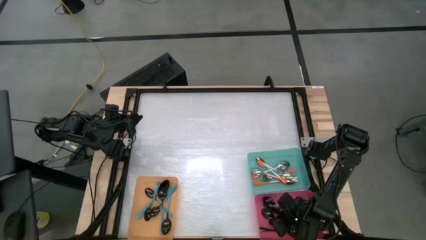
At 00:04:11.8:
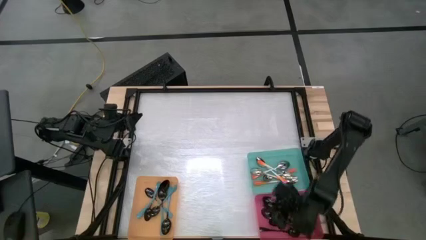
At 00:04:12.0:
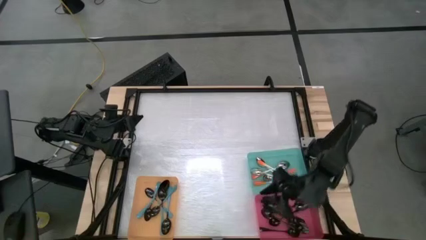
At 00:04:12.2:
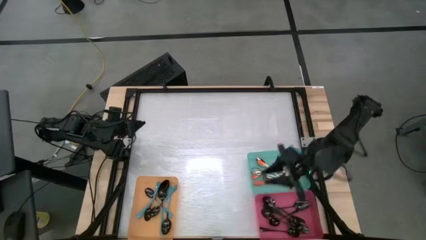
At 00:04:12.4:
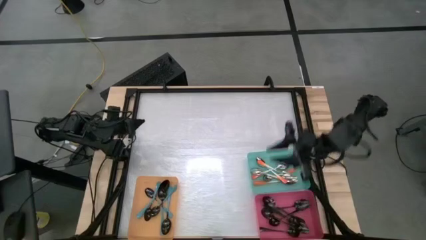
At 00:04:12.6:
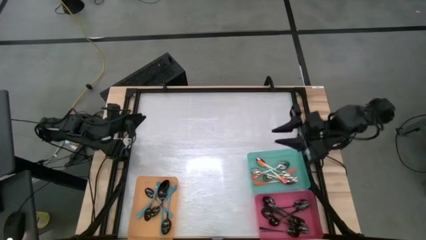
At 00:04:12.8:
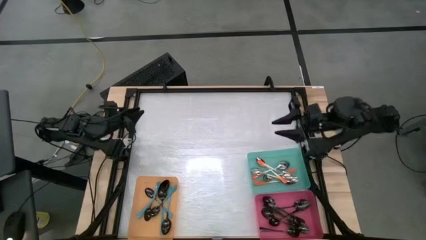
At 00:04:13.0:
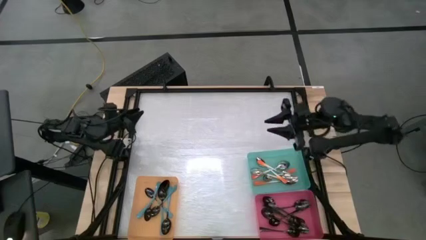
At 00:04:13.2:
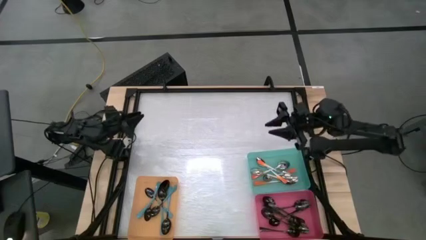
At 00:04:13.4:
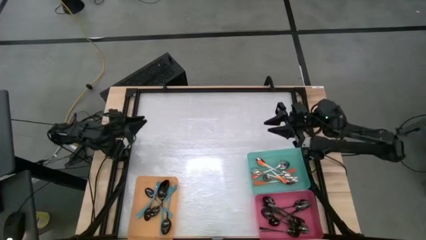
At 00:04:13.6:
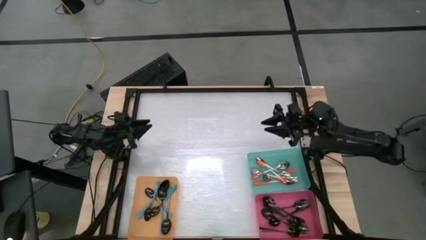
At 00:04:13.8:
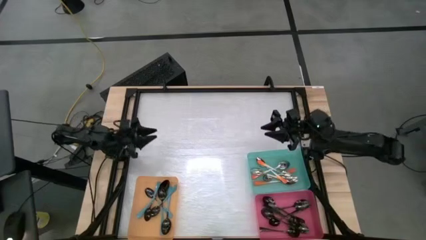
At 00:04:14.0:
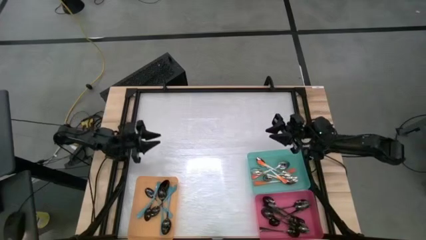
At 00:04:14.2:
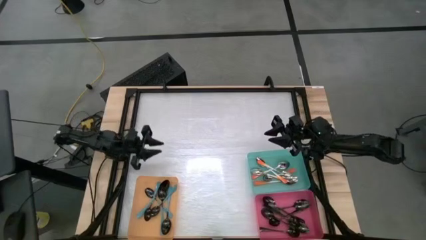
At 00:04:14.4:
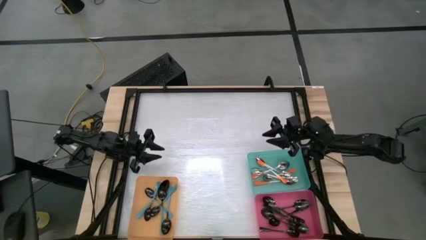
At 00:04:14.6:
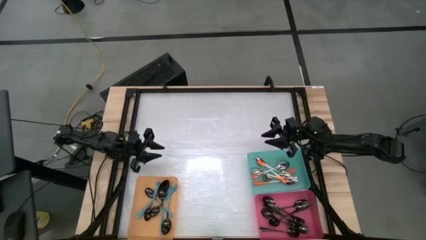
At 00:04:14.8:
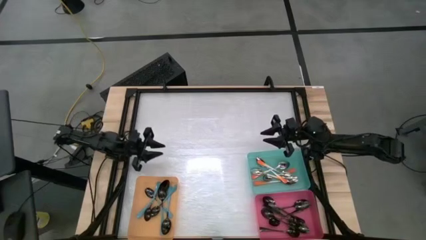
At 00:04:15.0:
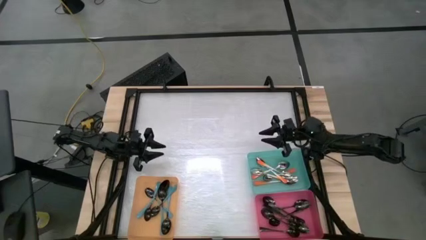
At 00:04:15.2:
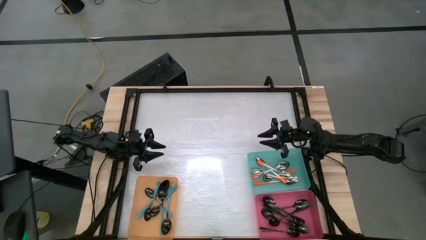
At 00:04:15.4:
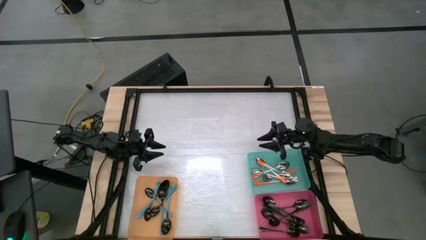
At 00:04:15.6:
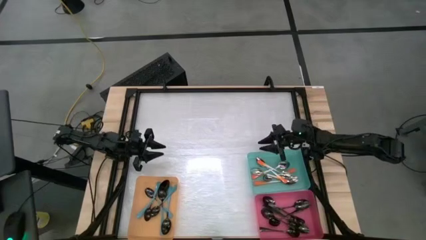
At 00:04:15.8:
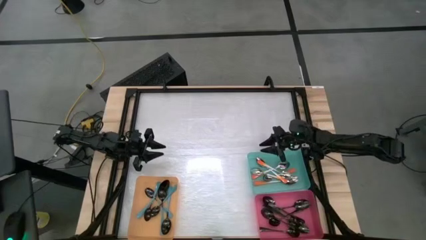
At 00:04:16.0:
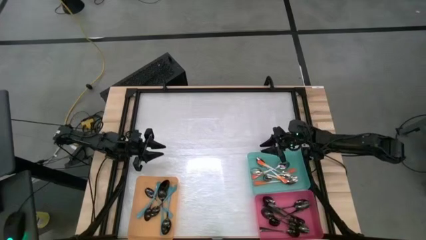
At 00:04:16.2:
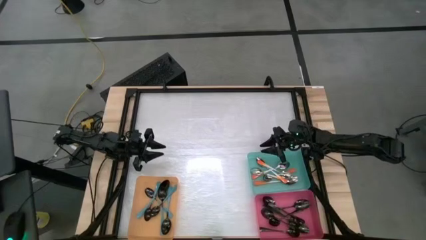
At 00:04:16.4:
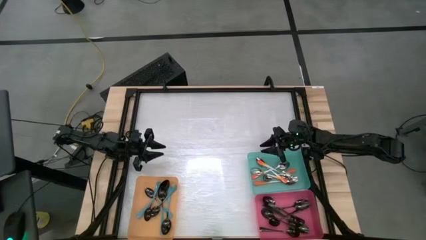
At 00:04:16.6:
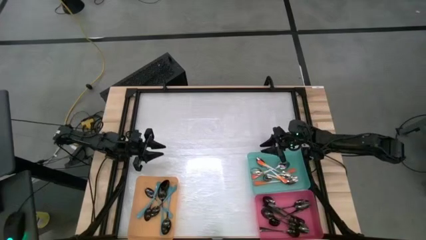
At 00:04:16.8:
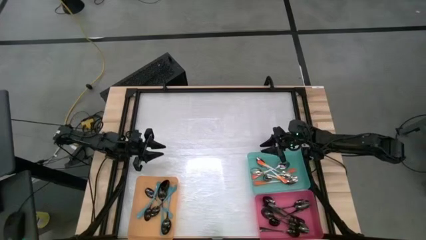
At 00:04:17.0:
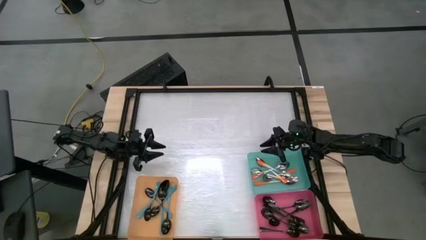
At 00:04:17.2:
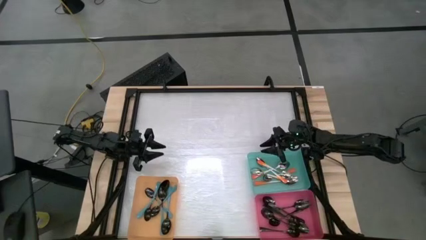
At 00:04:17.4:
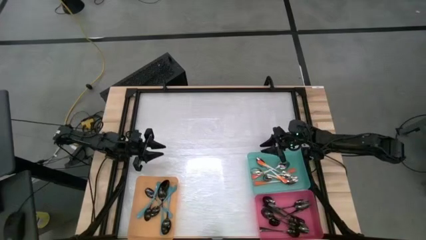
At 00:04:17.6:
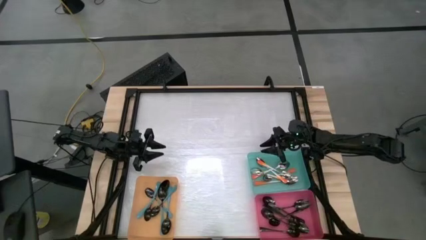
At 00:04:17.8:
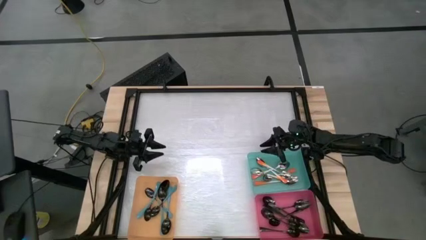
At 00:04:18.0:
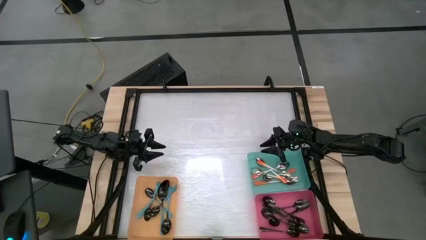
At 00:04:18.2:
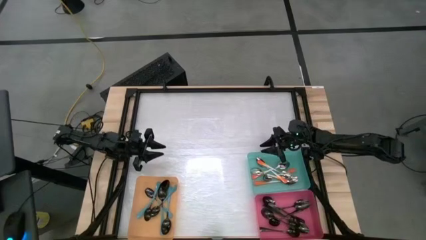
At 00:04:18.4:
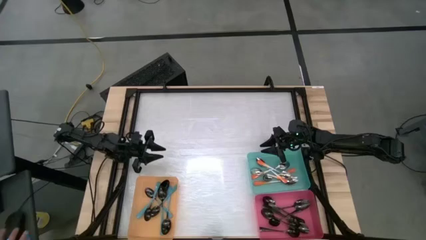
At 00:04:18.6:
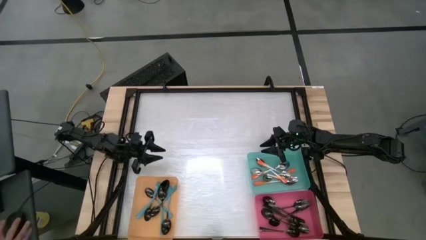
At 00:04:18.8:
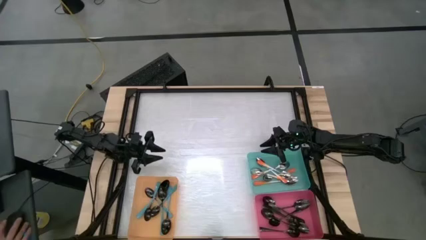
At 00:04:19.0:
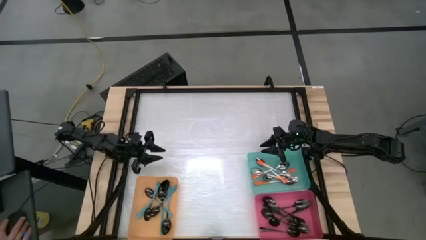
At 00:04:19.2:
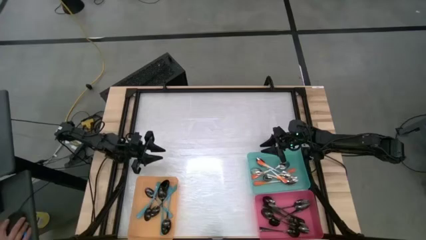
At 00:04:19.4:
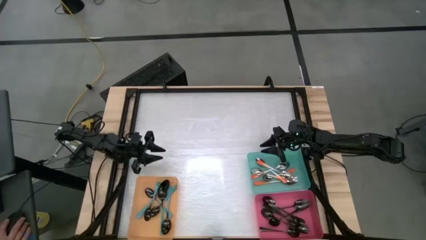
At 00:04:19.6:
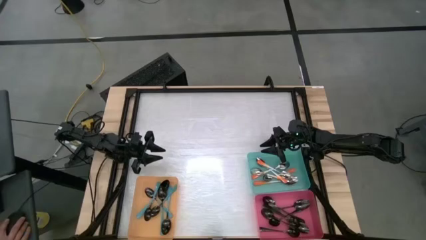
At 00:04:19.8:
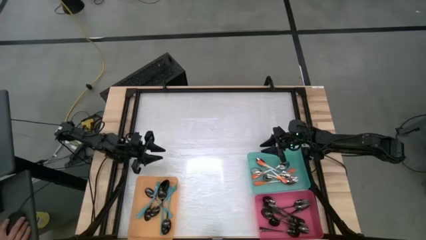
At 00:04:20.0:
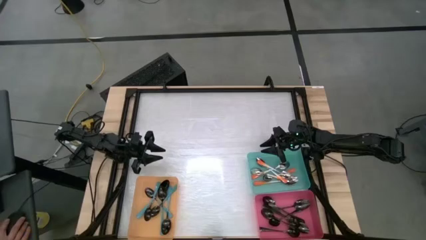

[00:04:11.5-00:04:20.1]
Task: Sort silverware by color (type)
Return to Home Position

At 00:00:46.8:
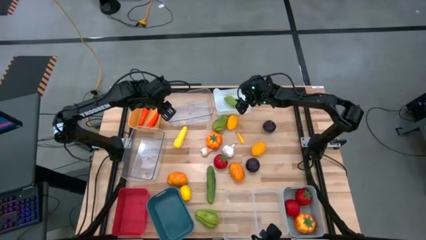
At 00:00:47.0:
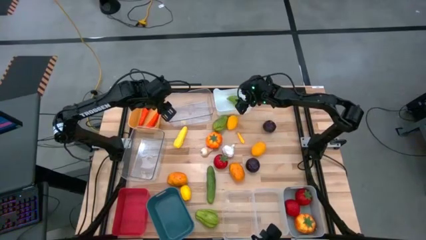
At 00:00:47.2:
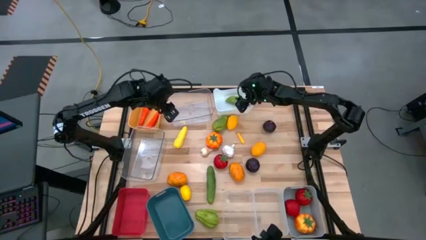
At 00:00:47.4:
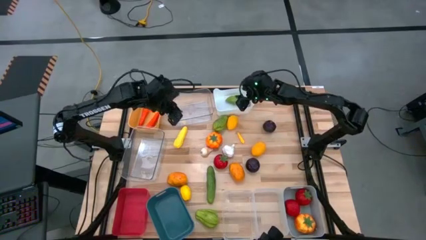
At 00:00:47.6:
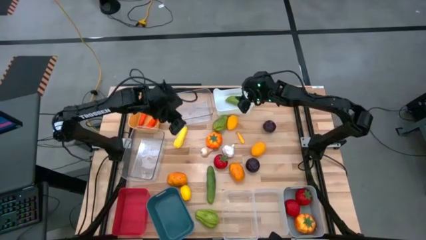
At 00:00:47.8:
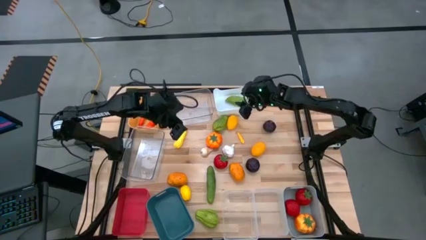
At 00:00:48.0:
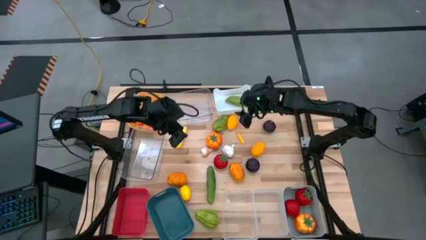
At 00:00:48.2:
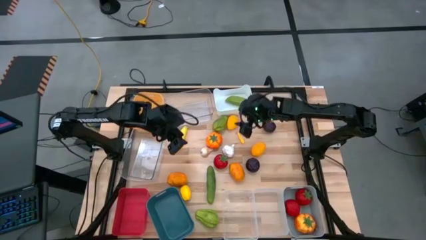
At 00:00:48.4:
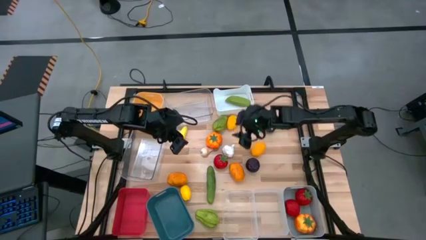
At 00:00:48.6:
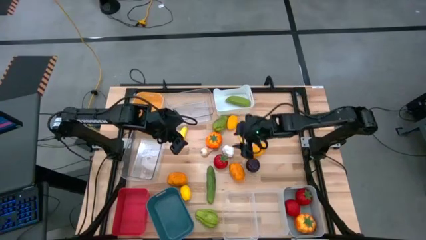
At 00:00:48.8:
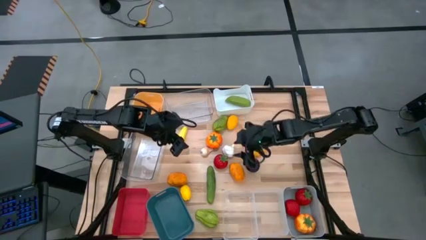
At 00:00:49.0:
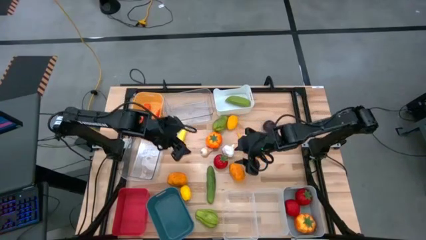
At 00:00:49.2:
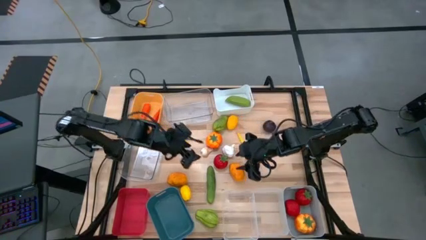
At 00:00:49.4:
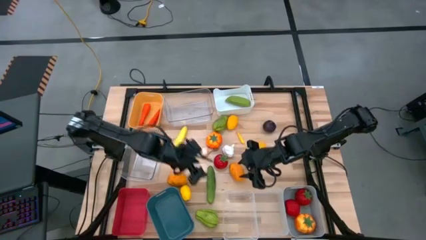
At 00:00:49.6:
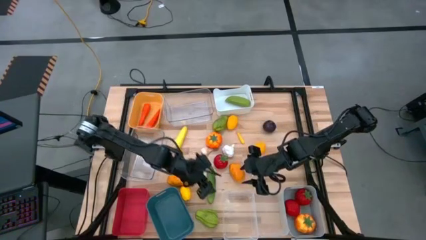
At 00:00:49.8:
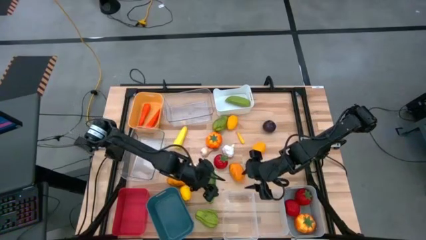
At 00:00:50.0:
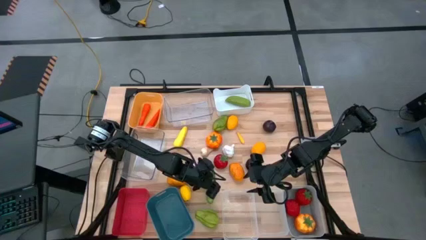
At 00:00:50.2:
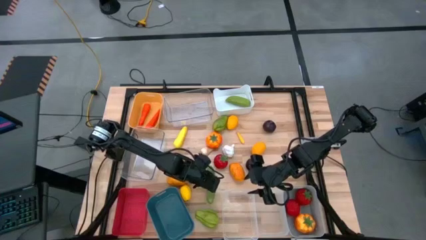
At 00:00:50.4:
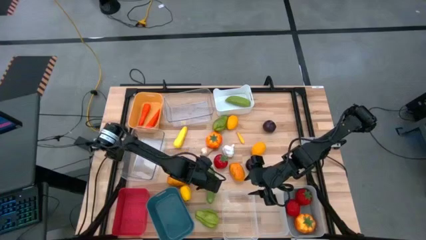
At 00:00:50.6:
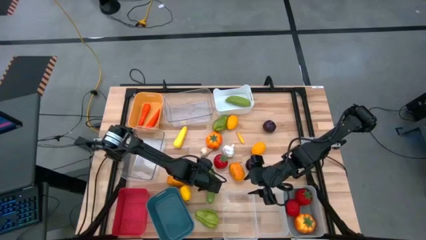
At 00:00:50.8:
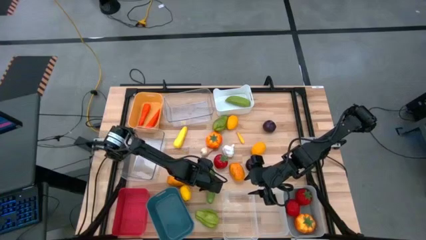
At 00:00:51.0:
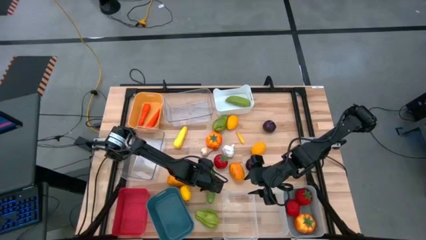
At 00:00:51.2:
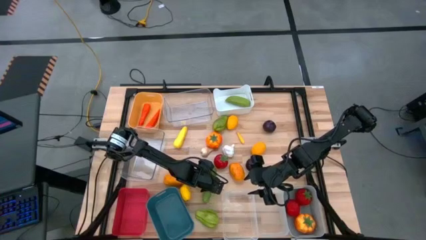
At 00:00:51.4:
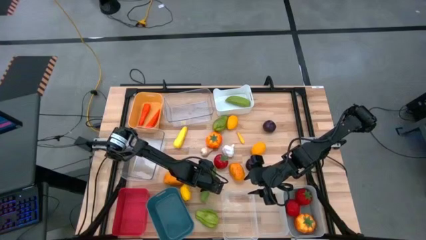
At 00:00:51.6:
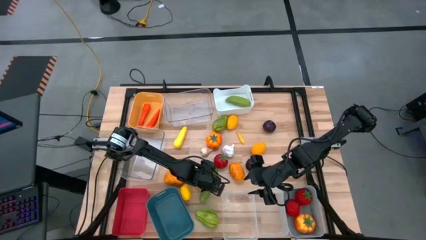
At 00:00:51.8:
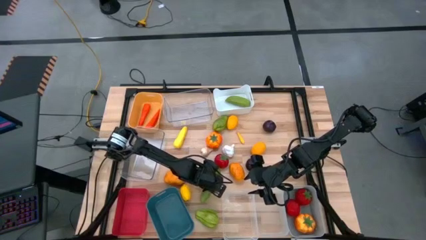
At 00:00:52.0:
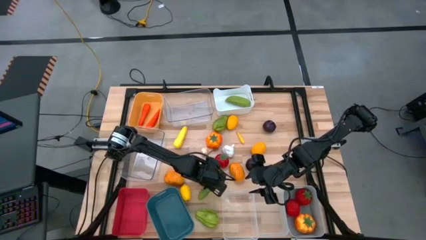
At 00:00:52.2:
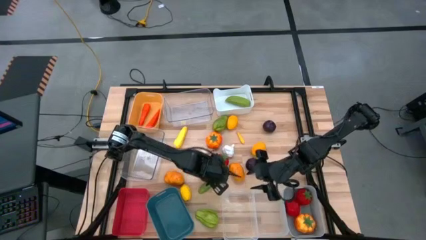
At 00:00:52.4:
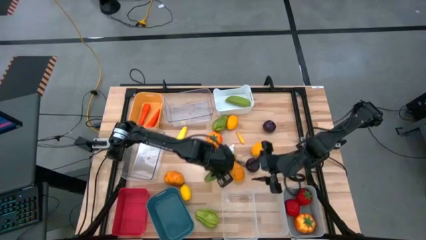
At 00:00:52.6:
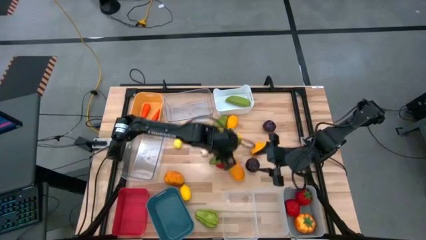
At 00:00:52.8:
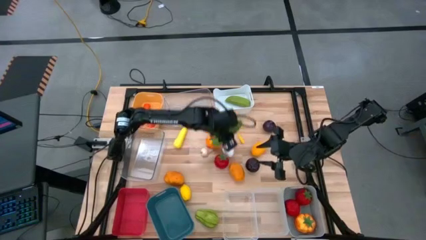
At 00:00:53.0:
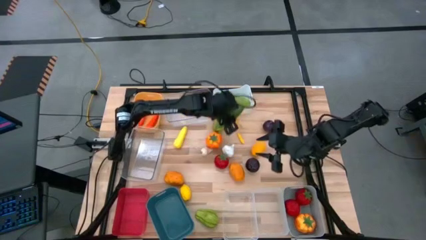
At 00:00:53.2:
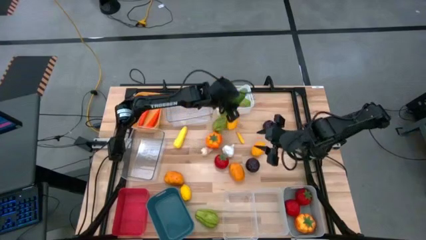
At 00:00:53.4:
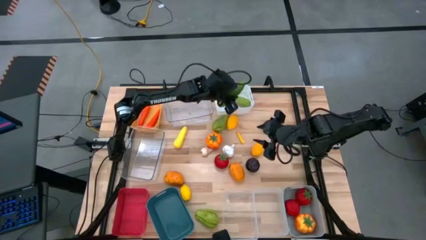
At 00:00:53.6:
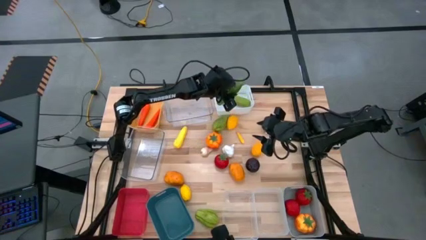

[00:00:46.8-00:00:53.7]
Task: Sort produce into baskets
Put the green cucumber into the white bin
